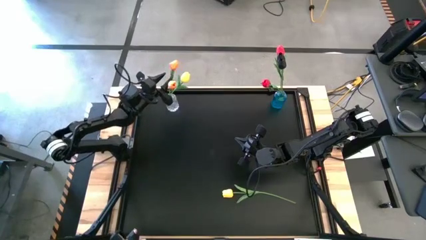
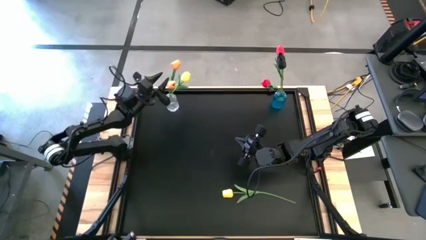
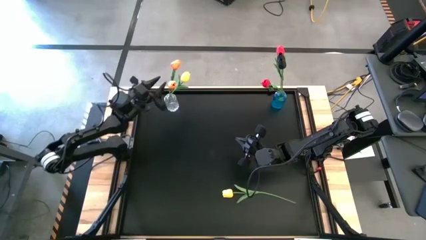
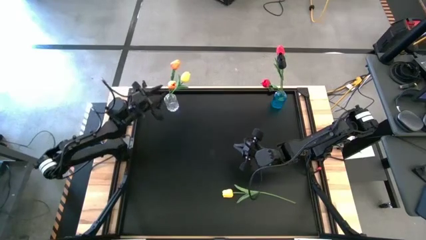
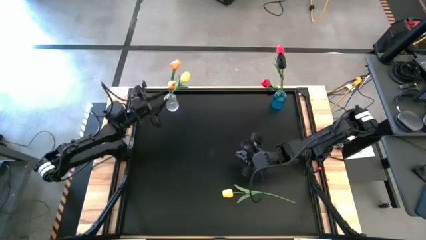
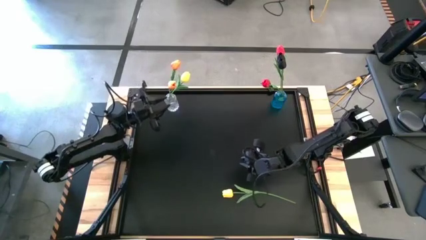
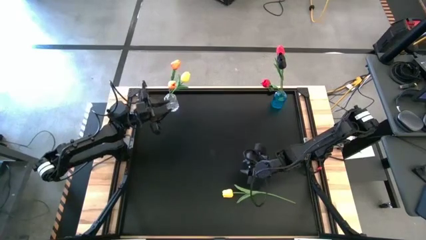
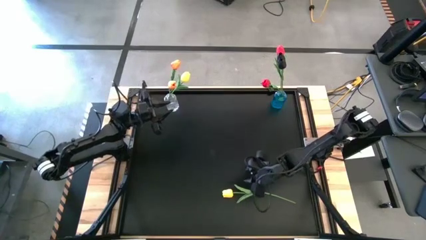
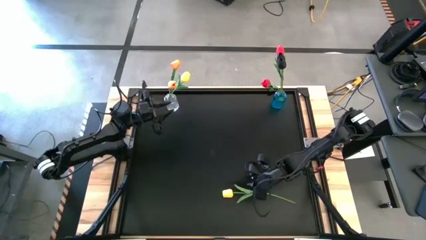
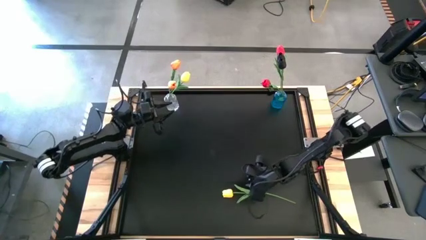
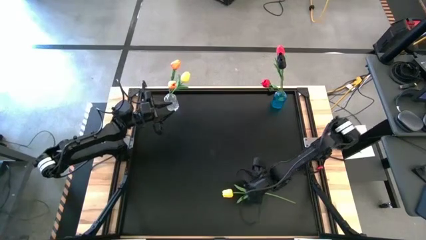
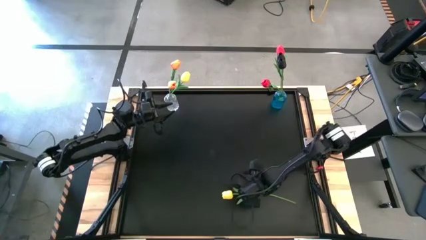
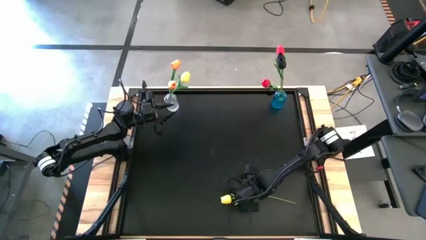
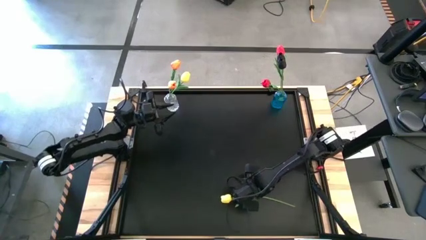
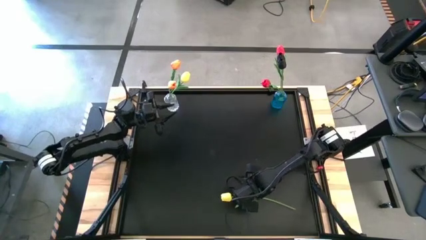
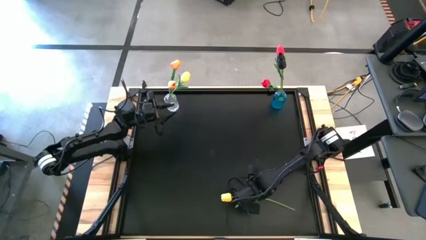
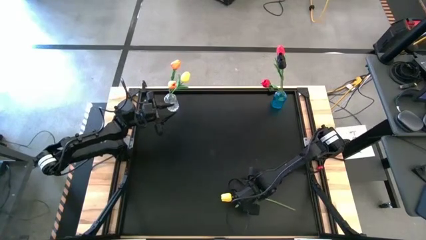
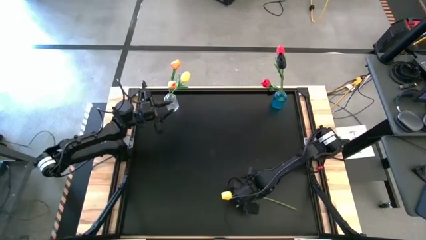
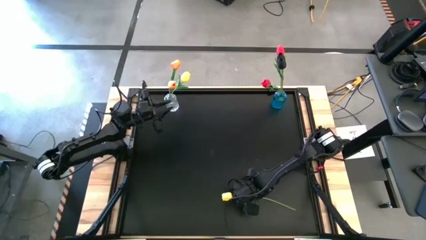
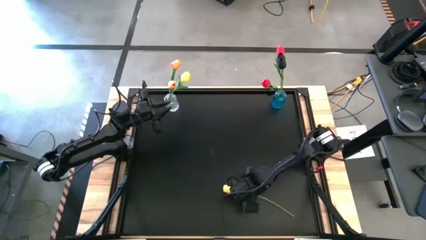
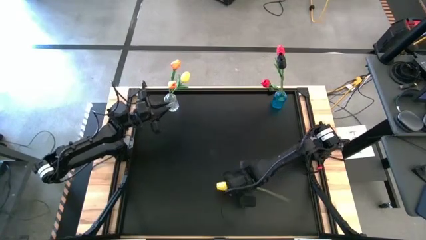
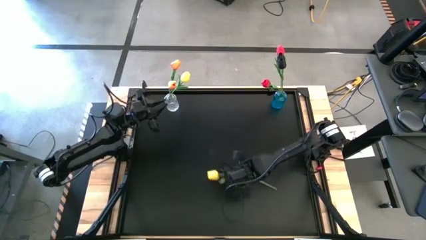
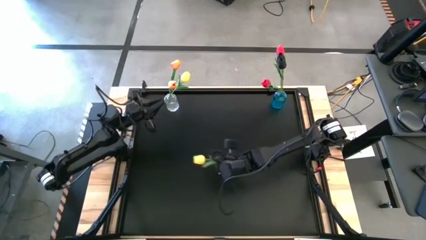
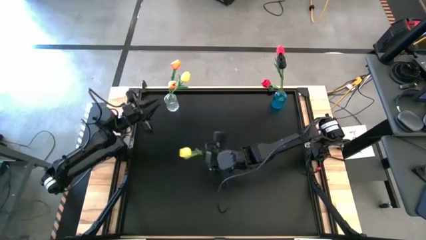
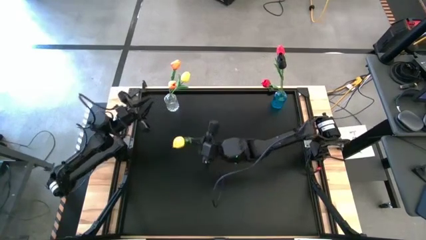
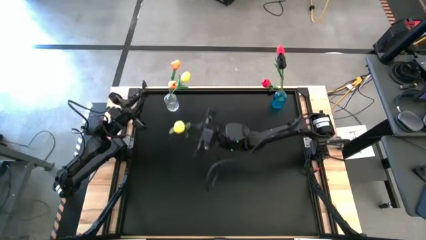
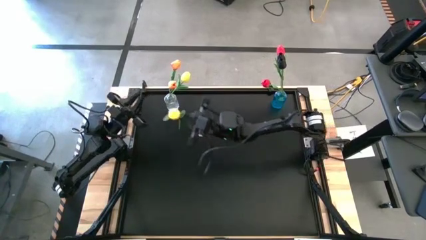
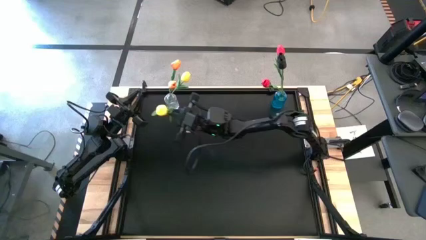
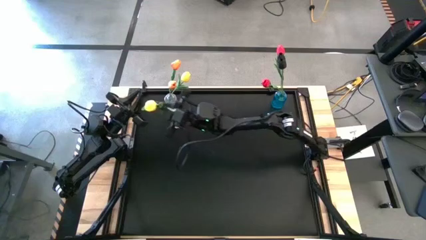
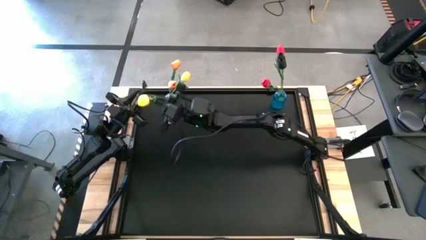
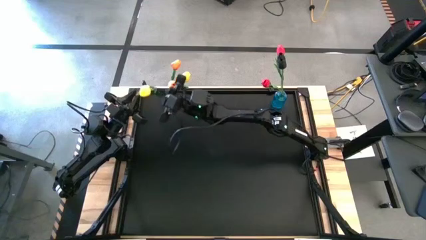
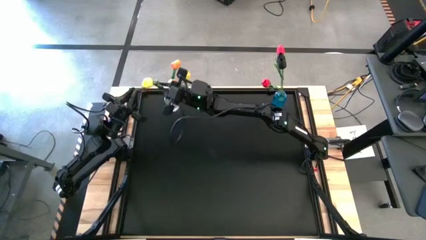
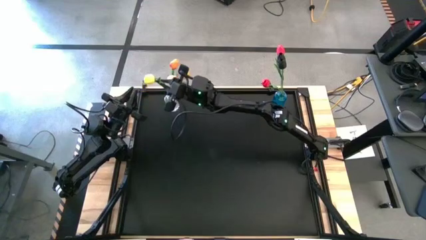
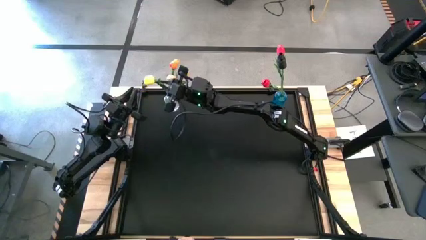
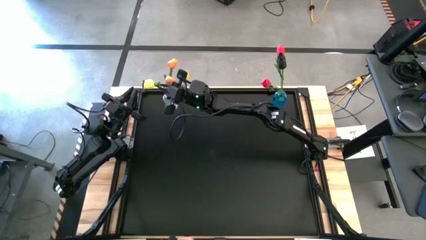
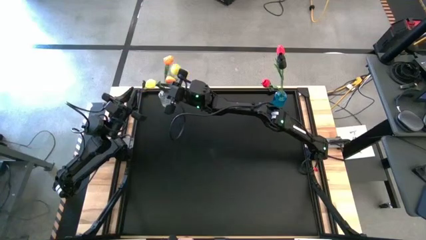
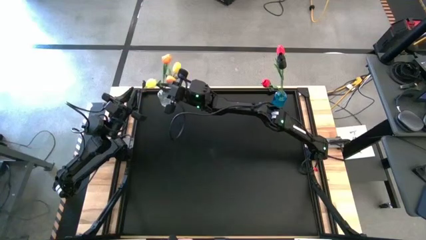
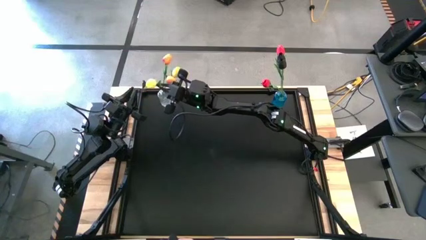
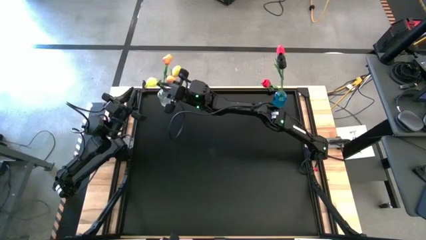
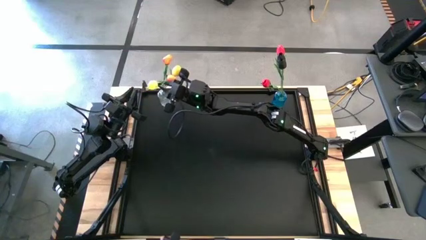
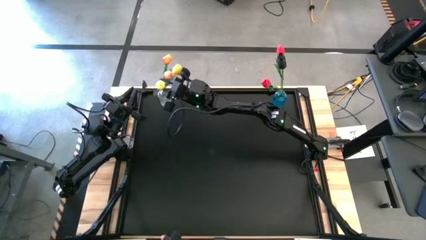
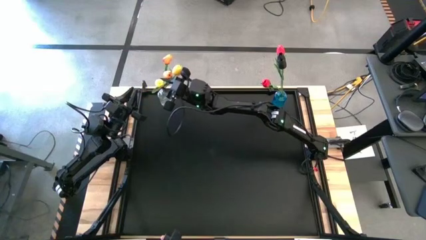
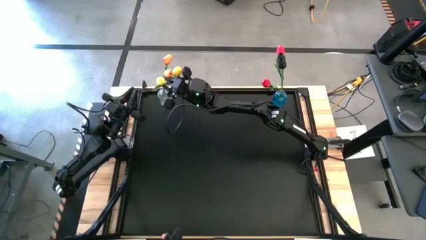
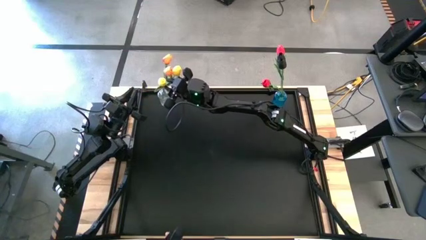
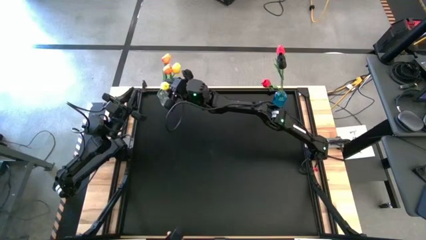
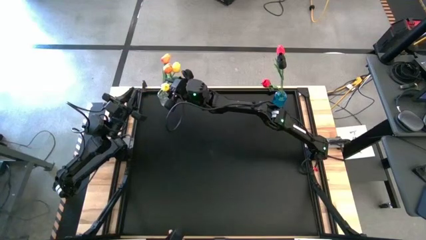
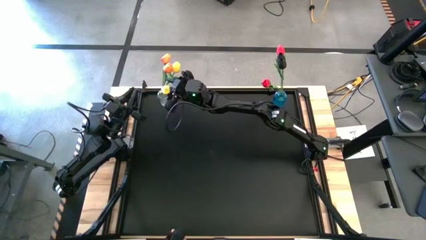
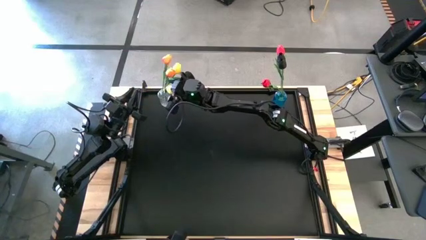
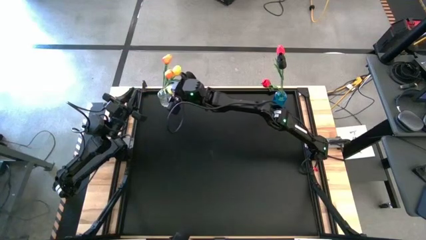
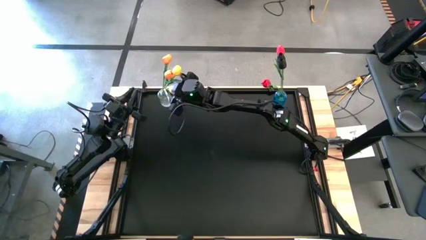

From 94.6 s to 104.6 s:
Task: Sort flowers into vase by color
Put the yellow tulip into the transparent vase

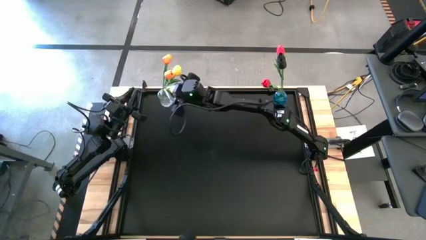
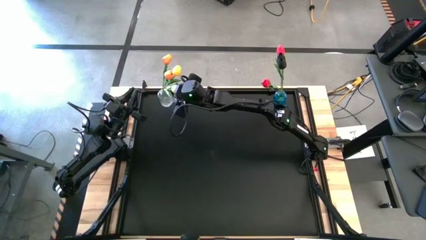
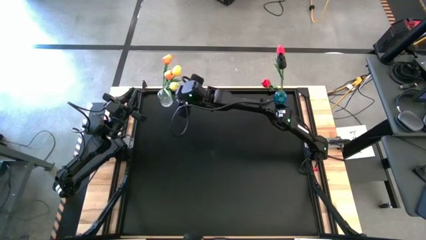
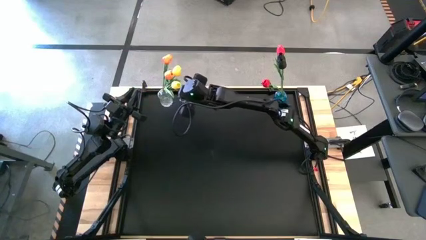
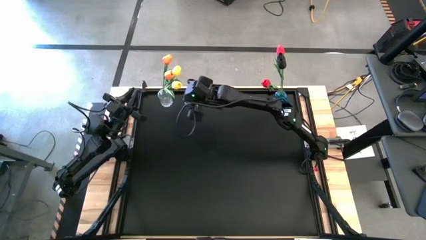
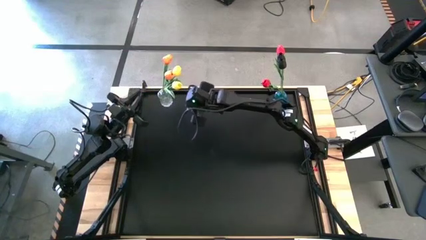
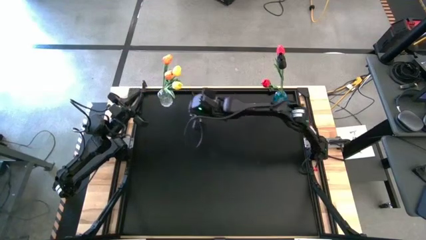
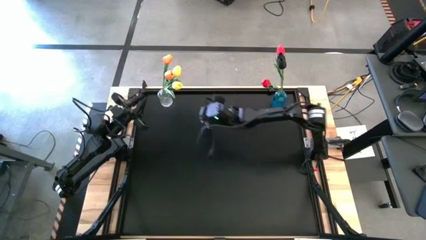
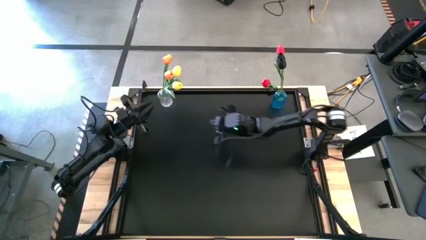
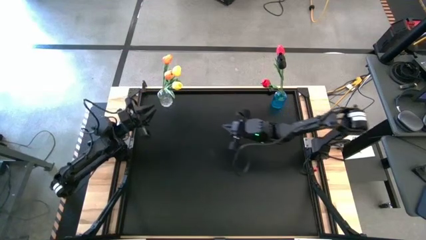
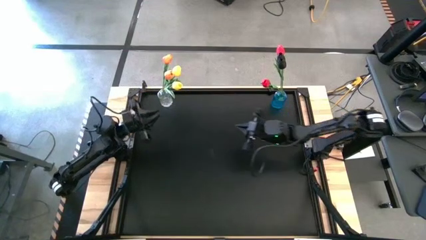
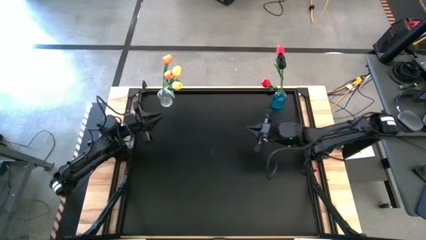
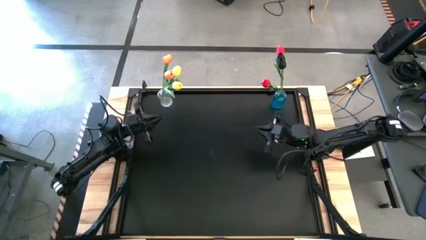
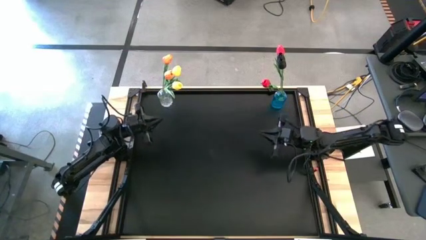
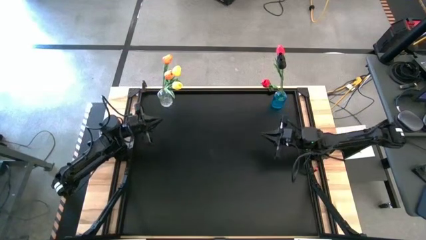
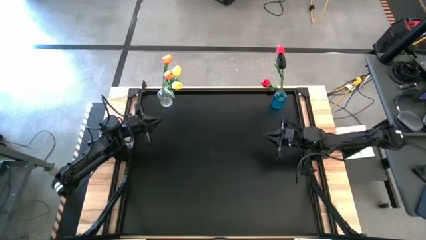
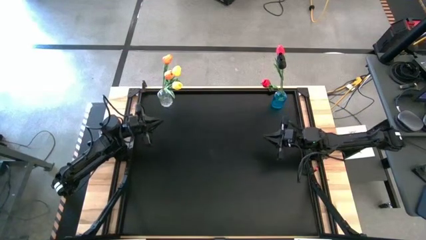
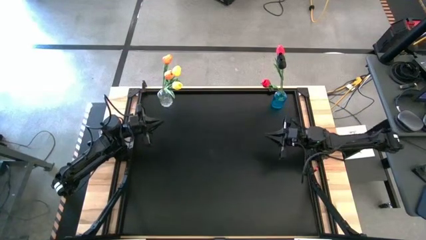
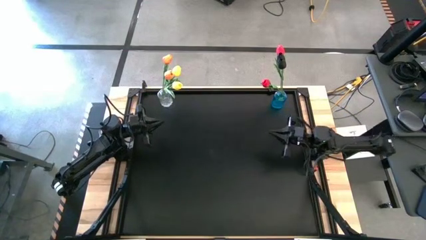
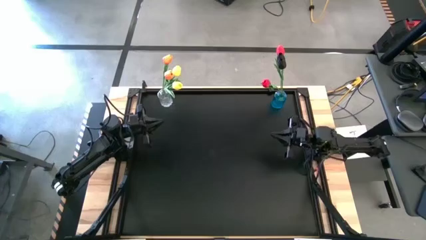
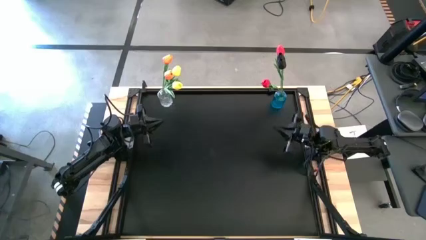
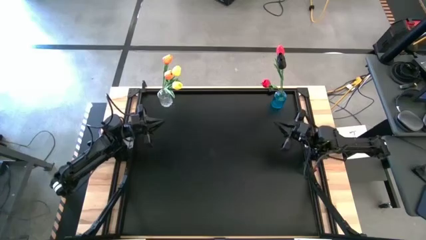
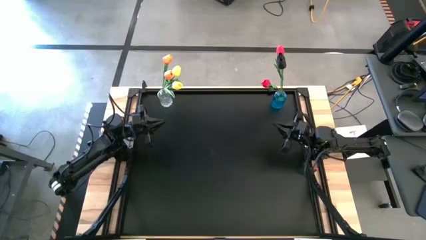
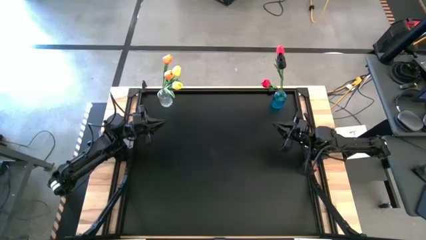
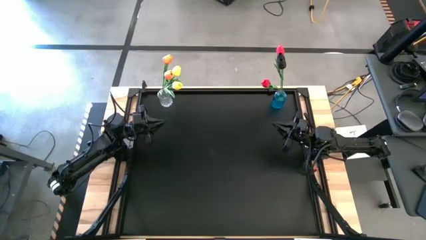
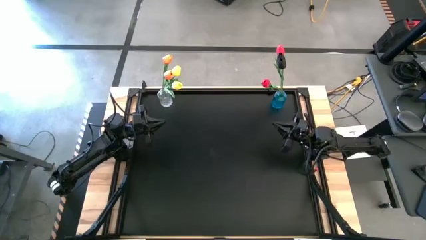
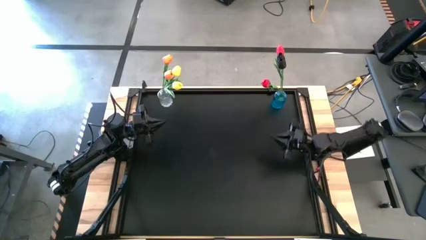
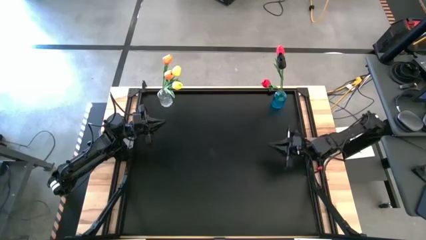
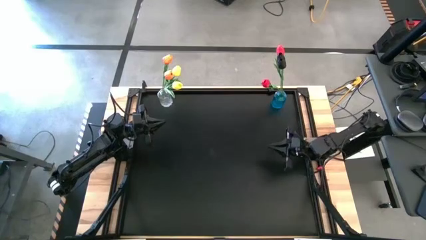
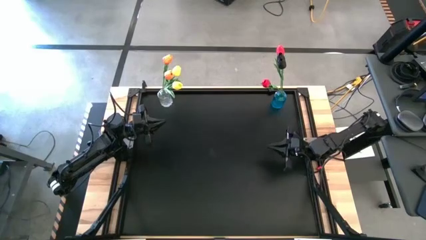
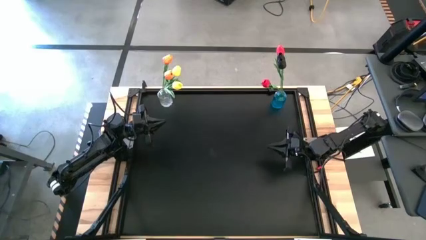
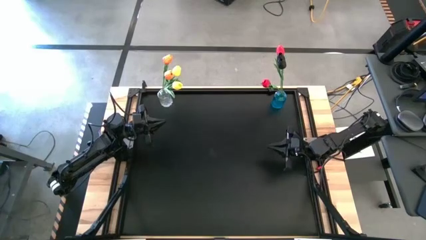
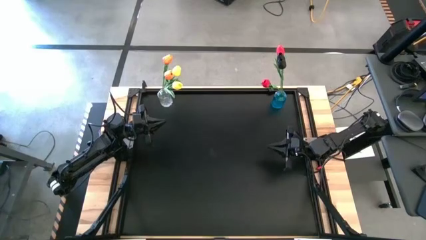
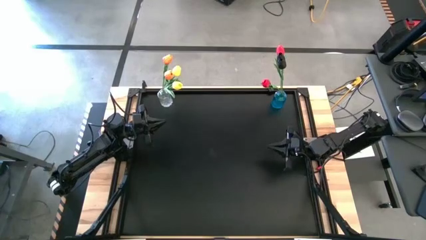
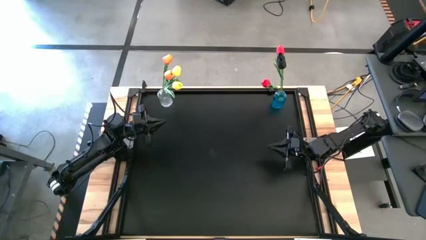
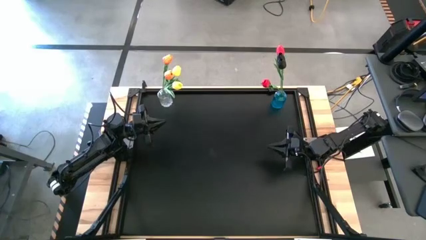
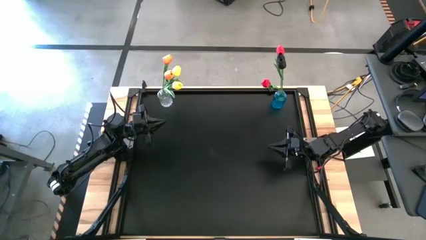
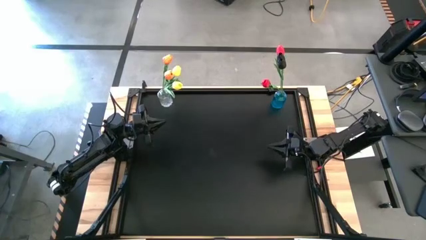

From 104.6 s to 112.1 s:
Return to Home Position
